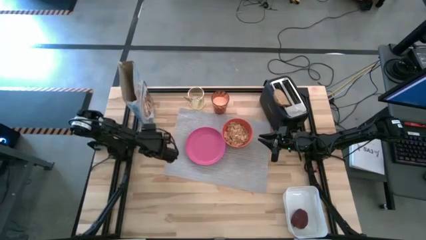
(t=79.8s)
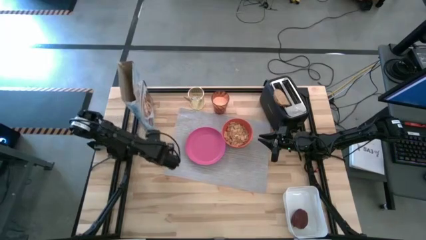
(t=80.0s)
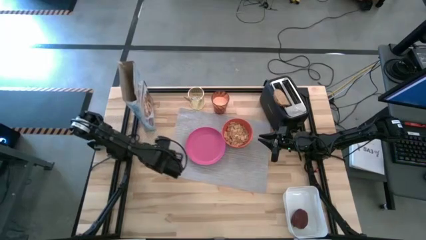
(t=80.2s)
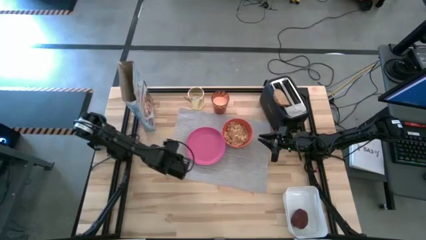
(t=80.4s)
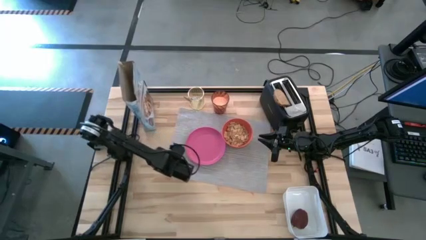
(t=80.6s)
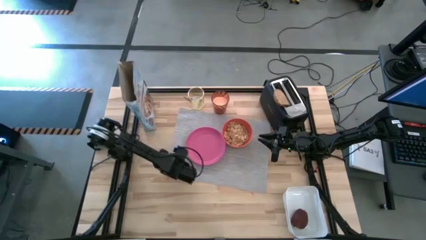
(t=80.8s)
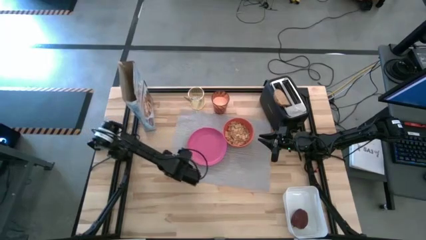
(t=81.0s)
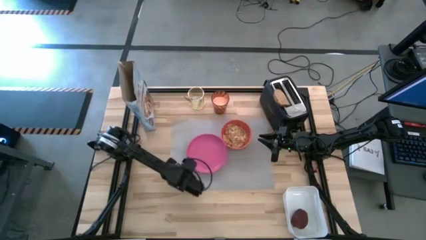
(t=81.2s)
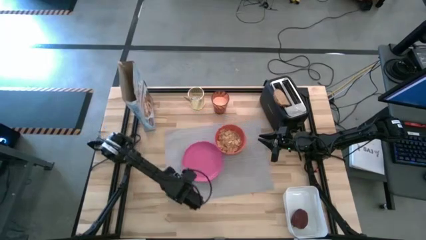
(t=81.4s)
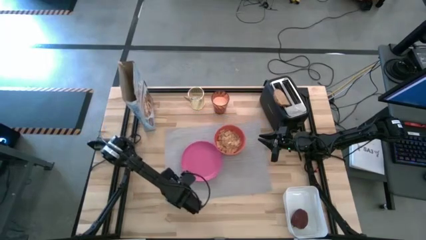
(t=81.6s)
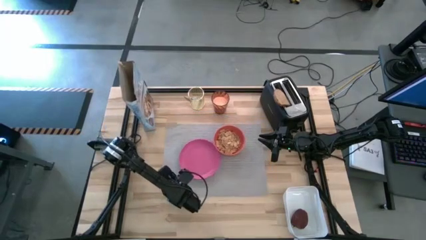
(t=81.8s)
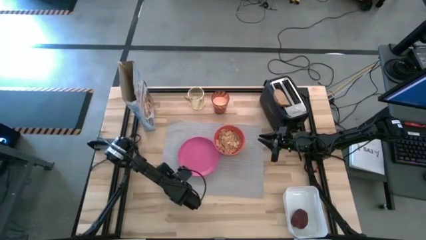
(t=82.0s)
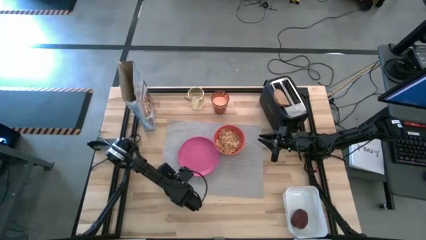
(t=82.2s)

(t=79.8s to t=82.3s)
Task: Arrange a breakfast setting
Adjust the gray placemat

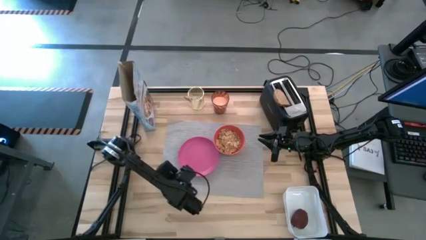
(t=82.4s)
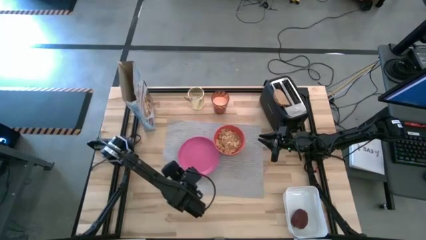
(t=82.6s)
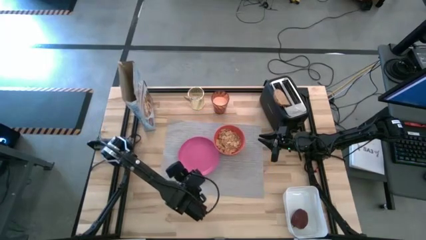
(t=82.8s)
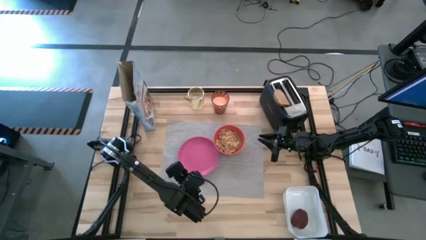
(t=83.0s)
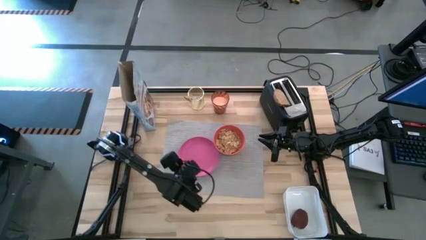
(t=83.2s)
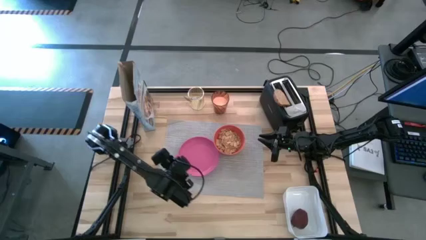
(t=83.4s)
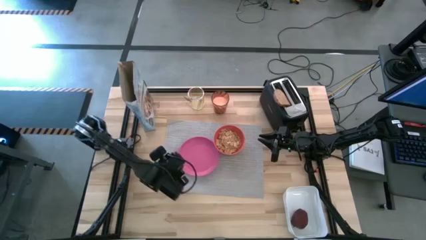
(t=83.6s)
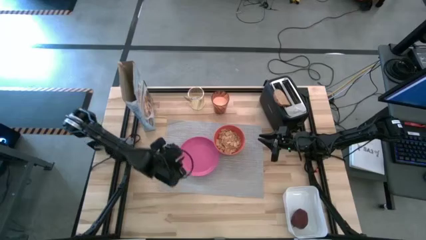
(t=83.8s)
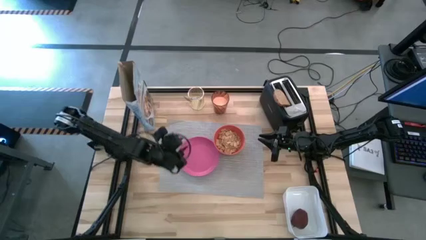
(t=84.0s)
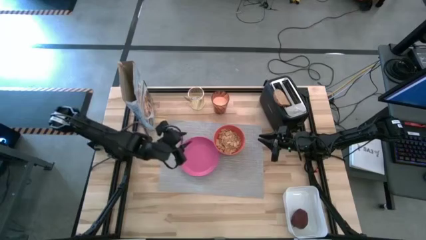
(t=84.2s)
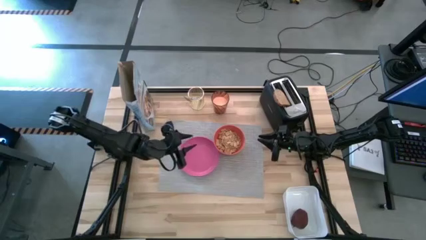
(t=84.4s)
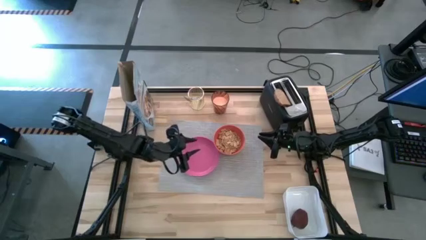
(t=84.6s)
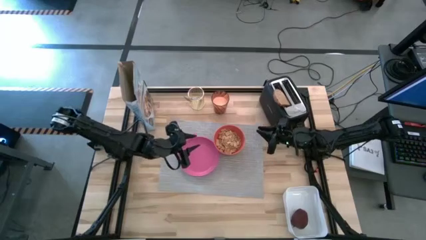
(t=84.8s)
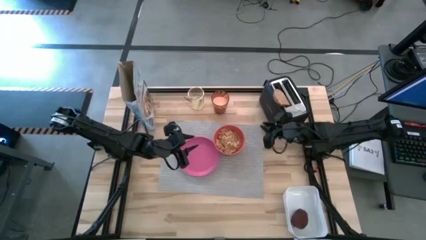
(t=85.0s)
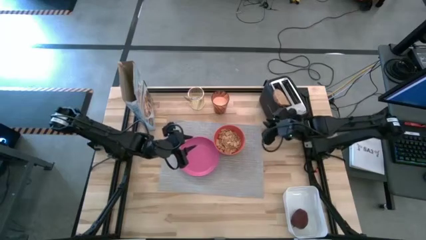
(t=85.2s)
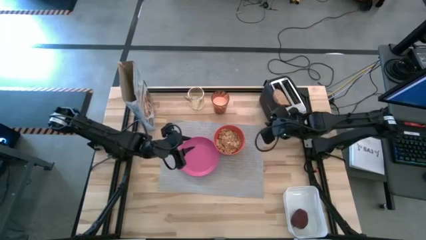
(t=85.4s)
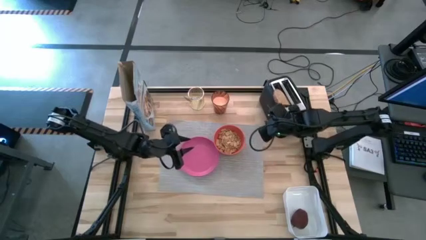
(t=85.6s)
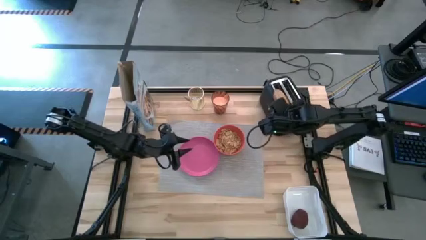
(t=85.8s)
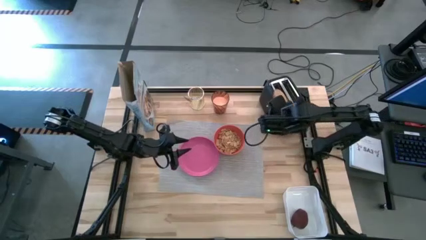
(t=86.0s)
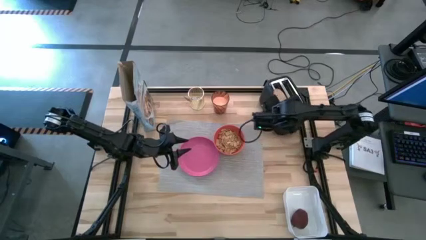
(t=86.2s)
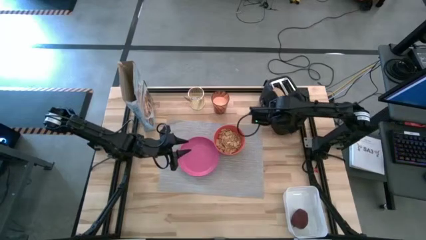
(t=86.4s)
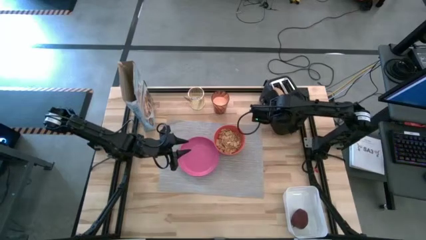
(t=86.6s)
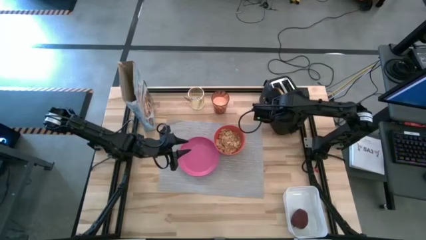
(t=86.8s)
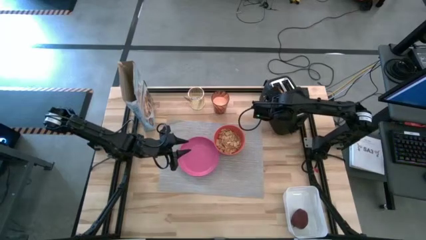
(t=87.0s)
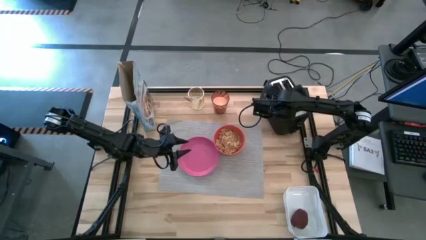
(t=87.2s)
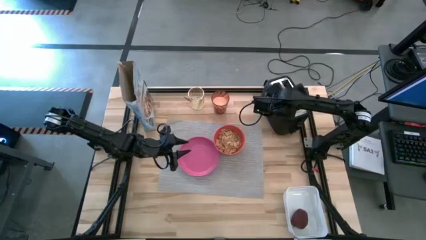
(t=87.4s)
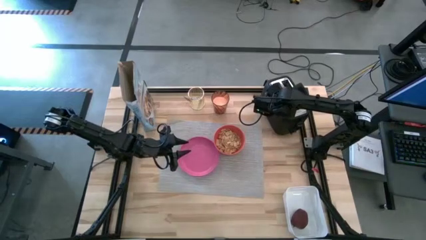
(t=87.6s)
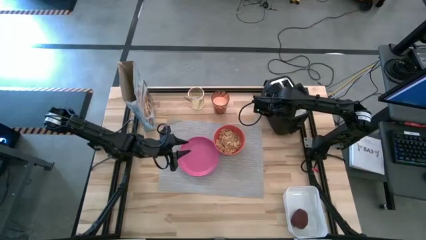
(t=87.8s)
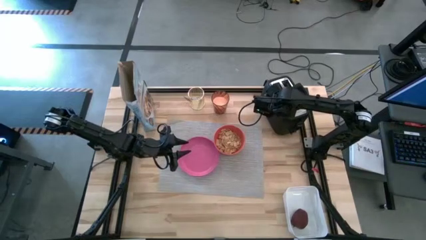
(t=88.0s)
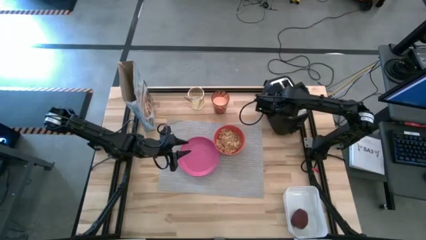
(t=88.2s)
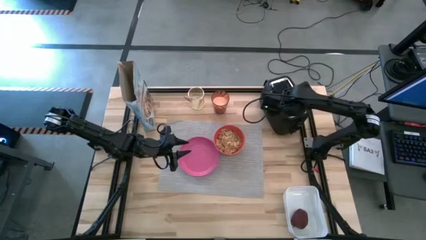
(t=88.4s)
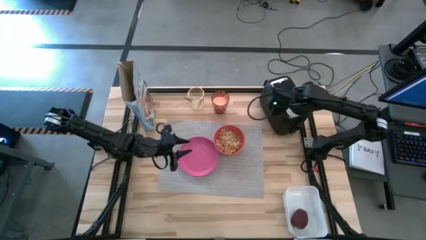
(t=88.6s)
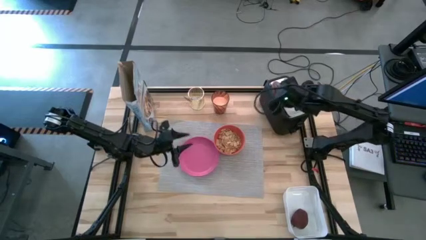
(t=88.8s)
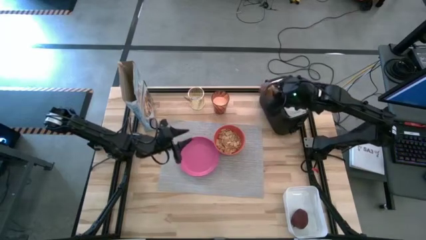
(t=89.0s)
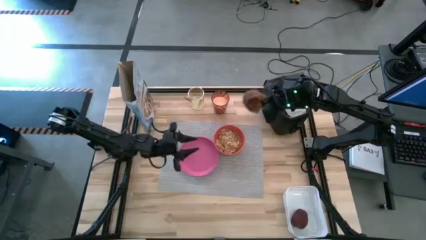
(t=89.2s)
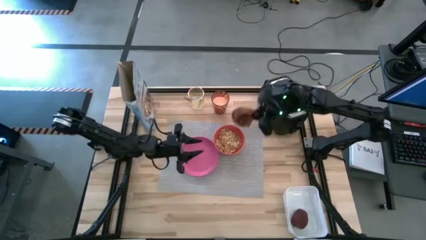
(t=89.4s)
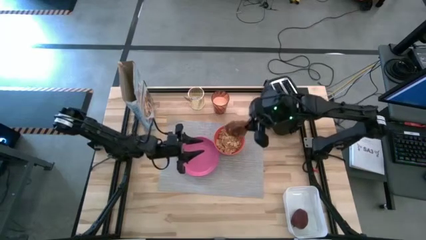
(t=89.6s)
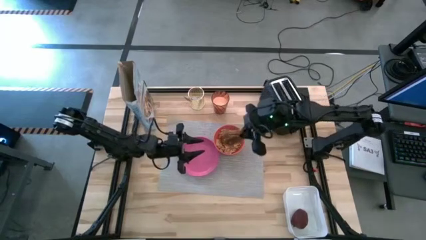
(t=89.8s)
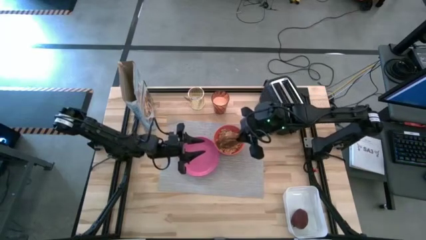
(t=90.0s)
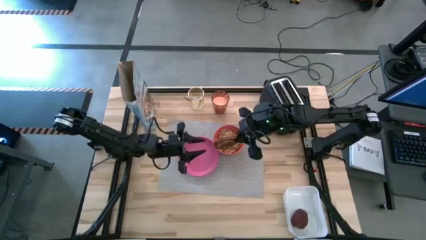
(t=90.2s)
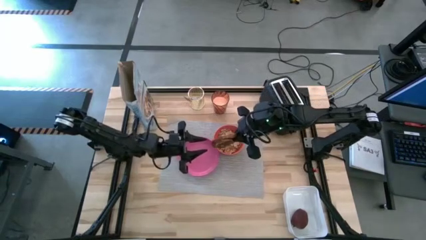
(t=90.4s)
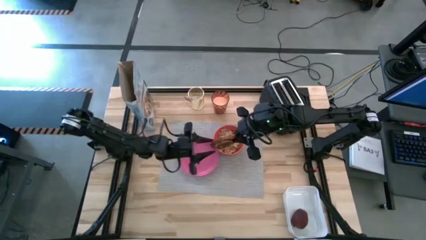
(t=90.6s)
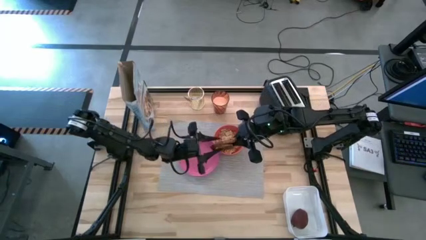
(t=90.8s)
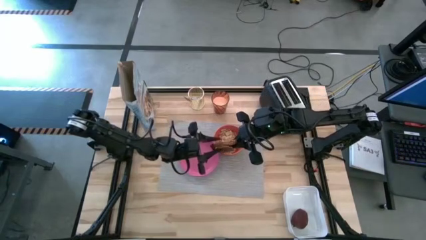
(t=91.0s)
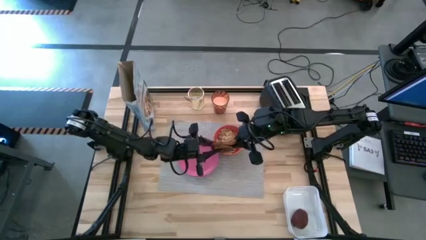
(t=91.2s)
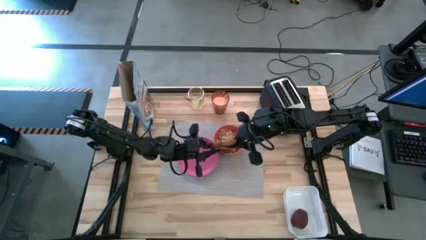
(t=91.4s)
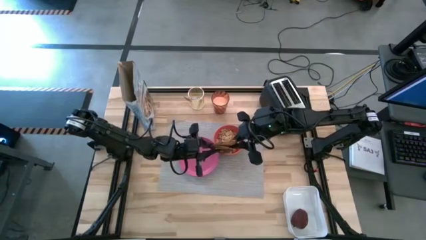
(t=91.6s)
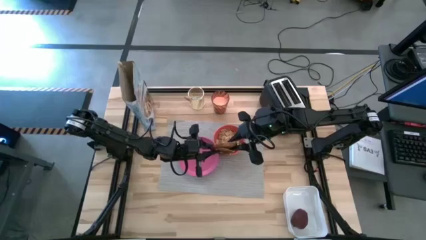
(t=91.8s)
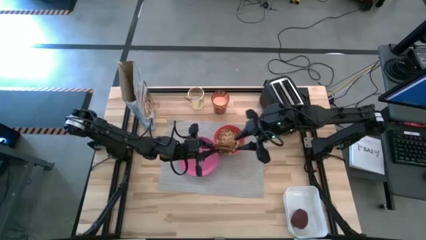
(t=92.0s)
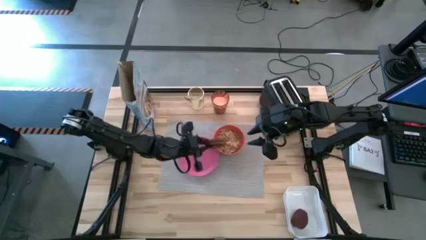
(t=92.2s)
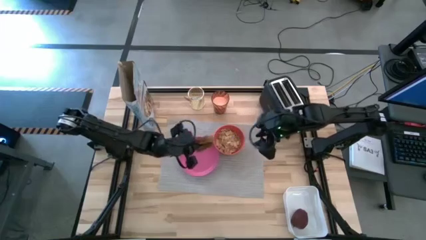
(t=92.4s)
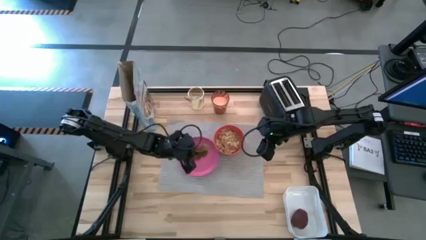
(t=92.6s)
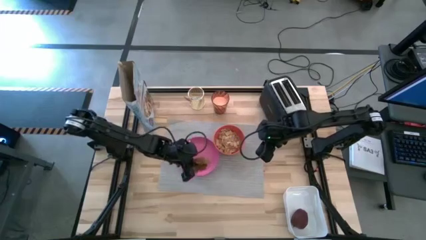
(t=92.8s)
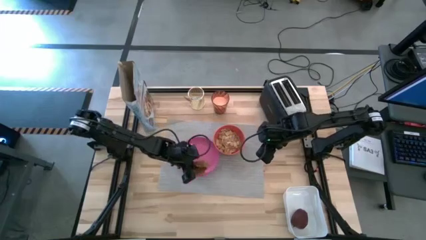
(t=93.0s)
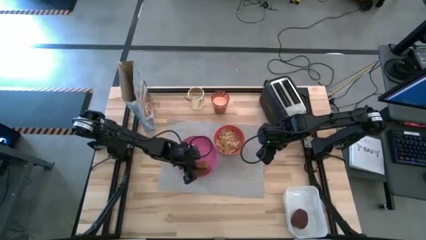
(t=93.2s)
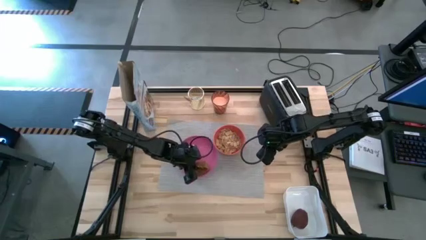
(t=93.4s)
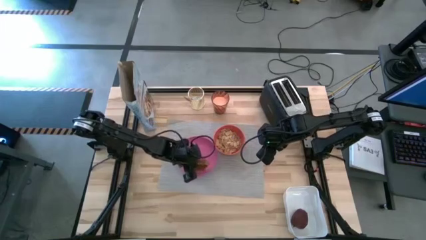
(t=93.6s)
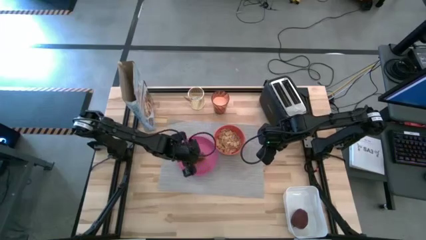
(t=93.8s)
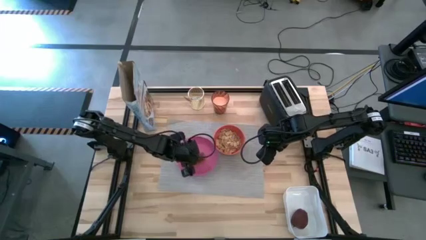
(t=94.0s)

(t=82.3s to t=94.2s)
Put the toasted bread on the pink plate
